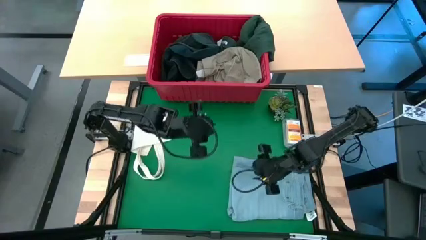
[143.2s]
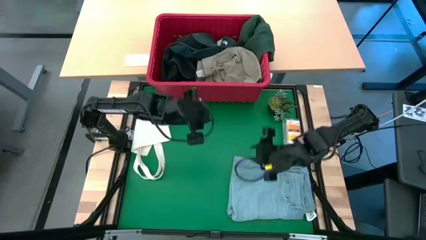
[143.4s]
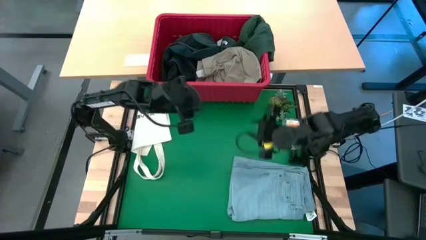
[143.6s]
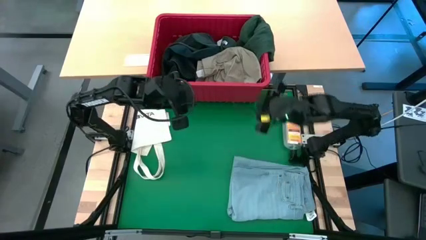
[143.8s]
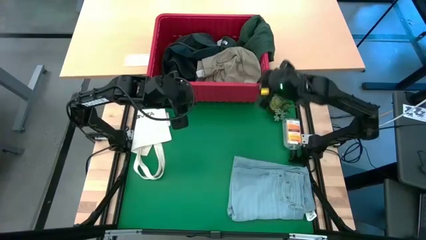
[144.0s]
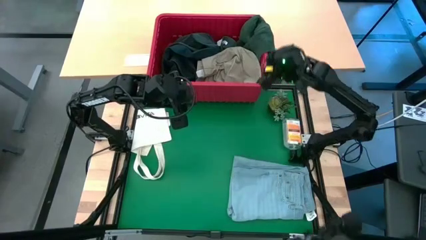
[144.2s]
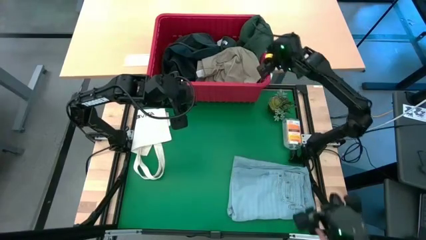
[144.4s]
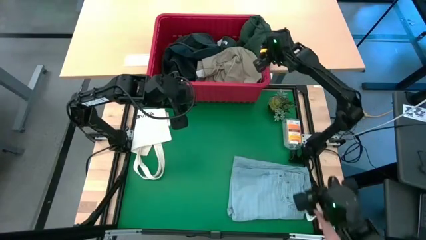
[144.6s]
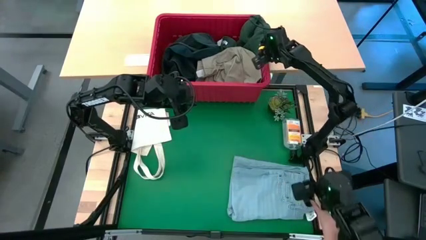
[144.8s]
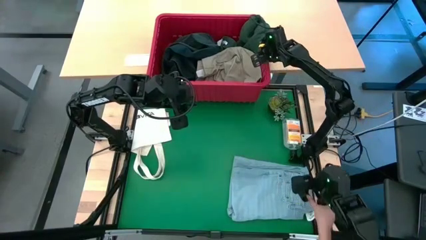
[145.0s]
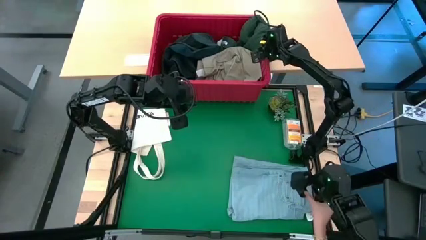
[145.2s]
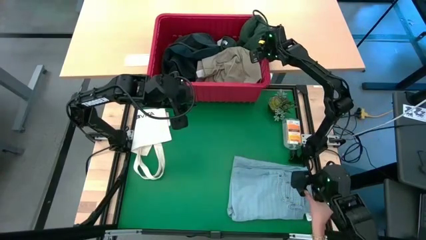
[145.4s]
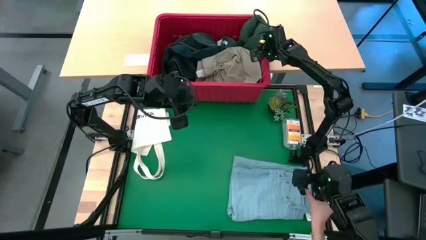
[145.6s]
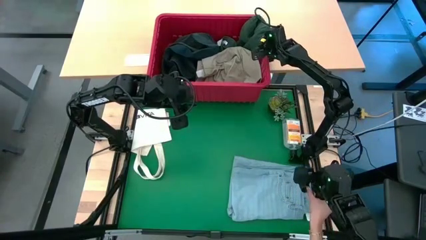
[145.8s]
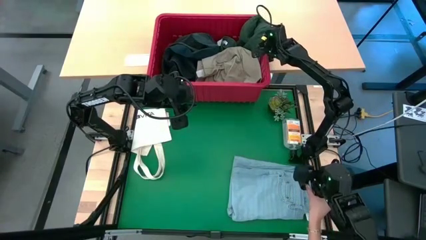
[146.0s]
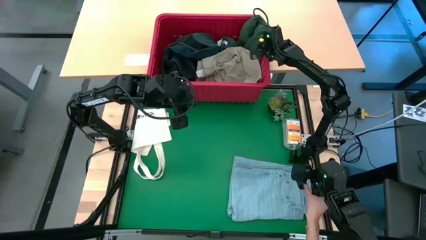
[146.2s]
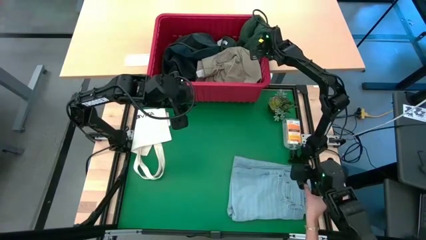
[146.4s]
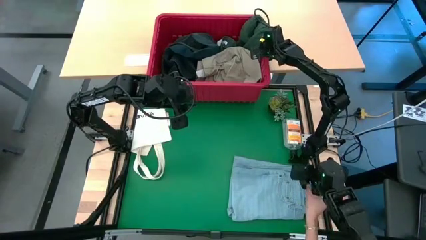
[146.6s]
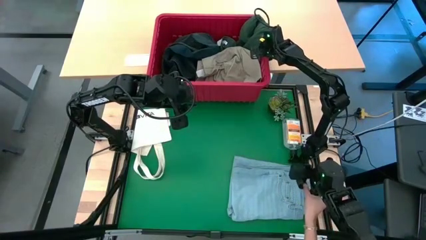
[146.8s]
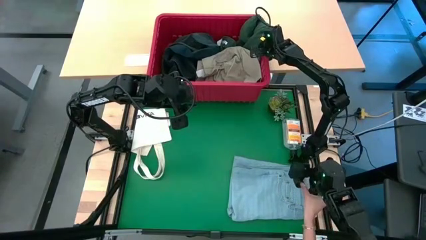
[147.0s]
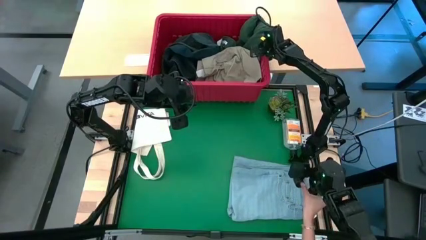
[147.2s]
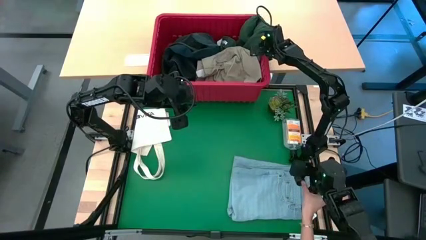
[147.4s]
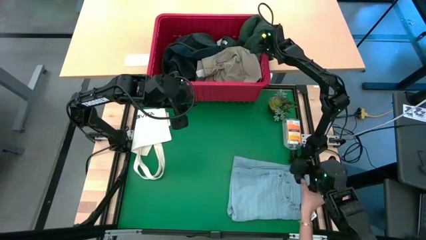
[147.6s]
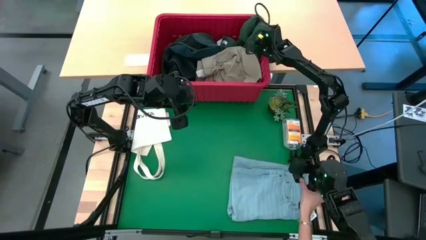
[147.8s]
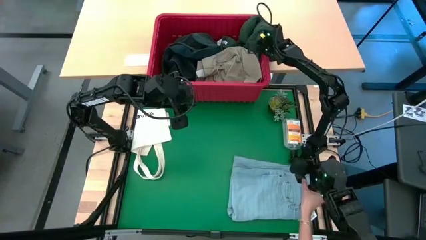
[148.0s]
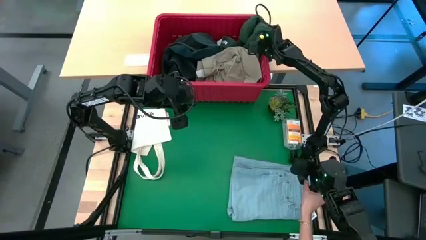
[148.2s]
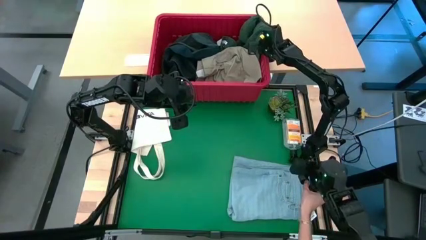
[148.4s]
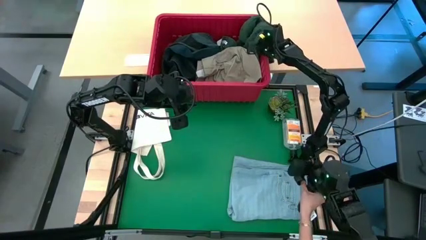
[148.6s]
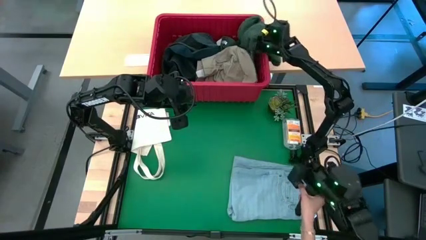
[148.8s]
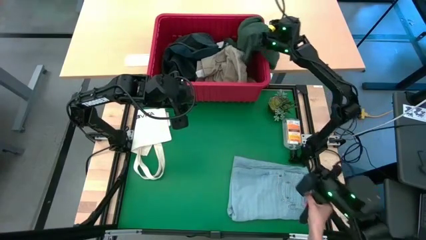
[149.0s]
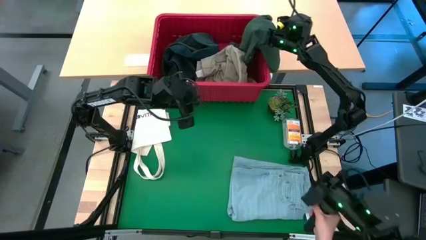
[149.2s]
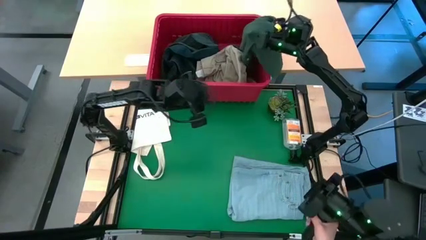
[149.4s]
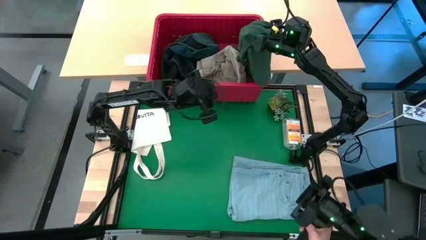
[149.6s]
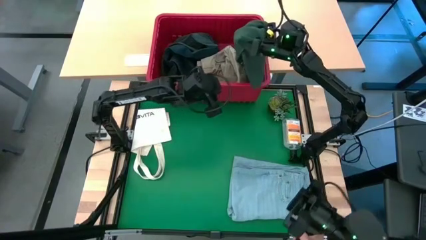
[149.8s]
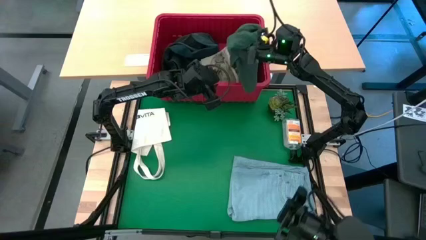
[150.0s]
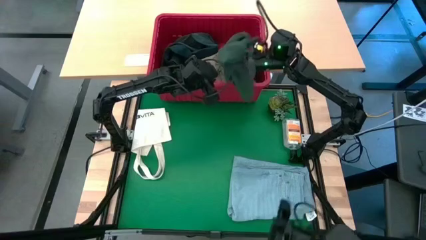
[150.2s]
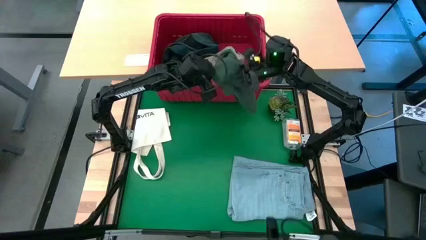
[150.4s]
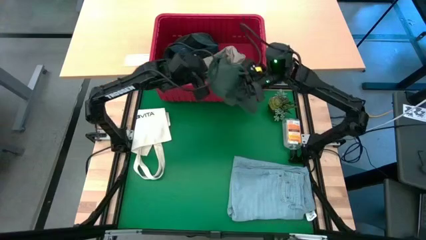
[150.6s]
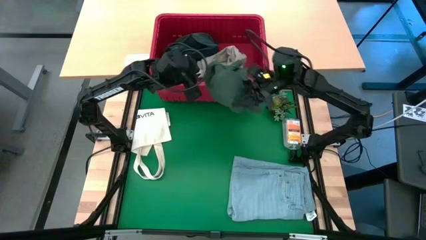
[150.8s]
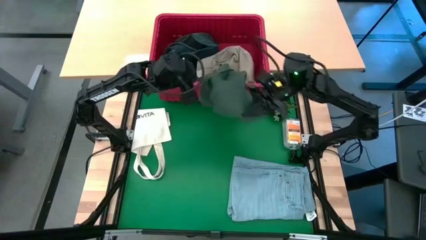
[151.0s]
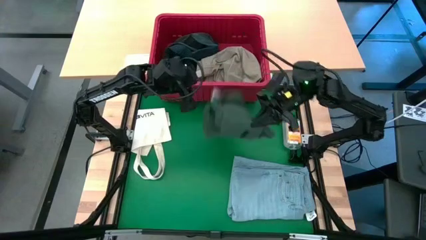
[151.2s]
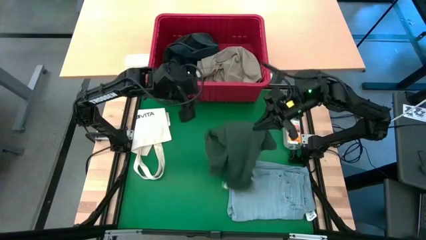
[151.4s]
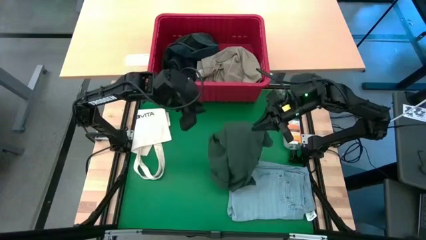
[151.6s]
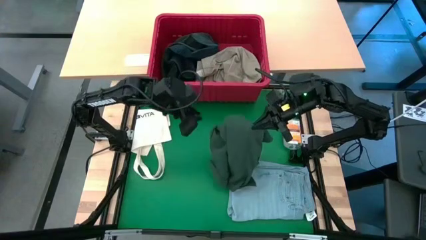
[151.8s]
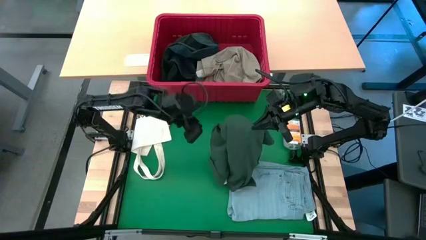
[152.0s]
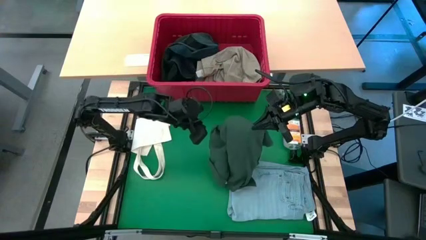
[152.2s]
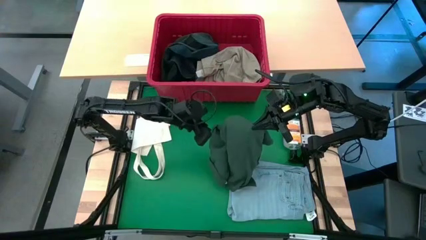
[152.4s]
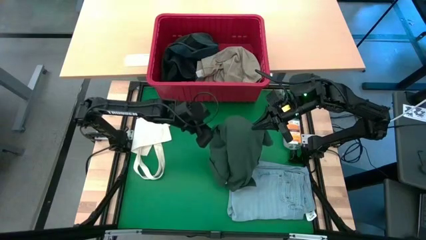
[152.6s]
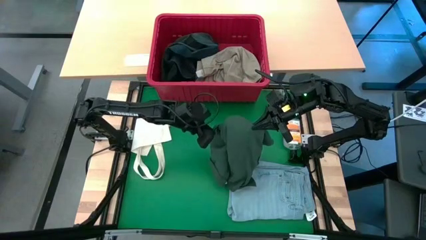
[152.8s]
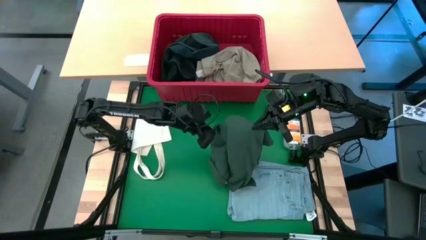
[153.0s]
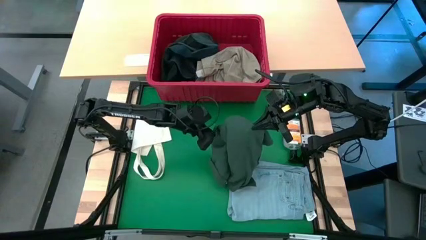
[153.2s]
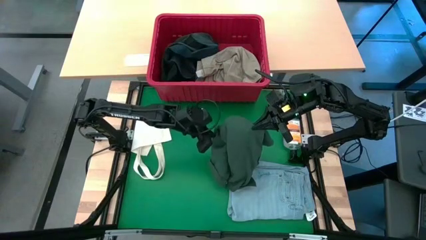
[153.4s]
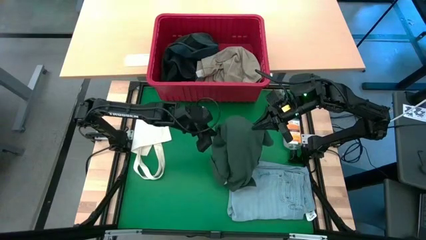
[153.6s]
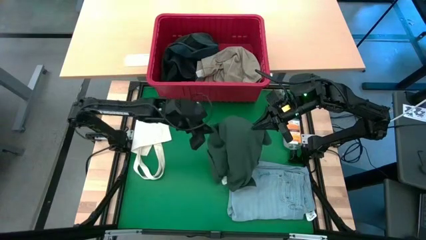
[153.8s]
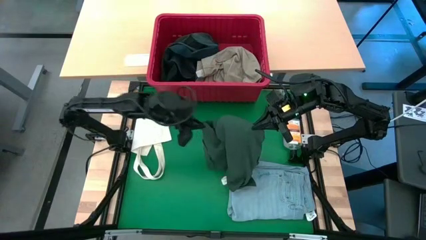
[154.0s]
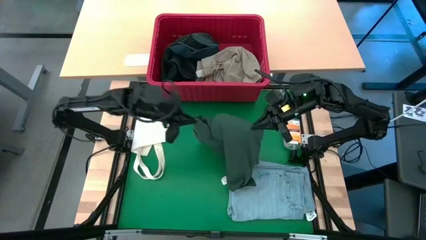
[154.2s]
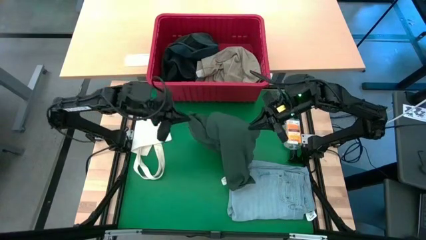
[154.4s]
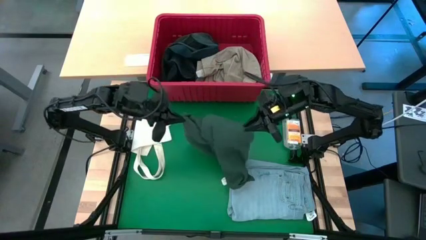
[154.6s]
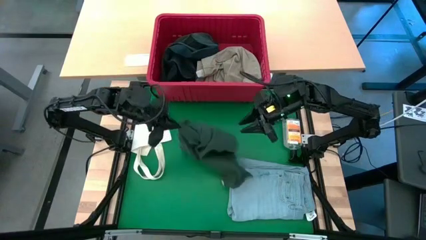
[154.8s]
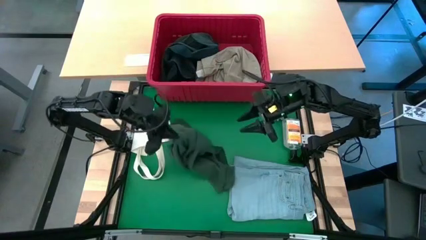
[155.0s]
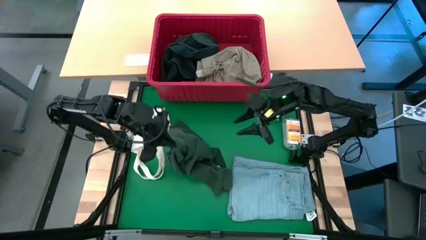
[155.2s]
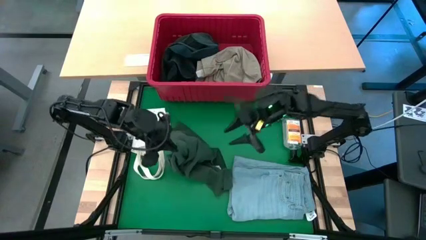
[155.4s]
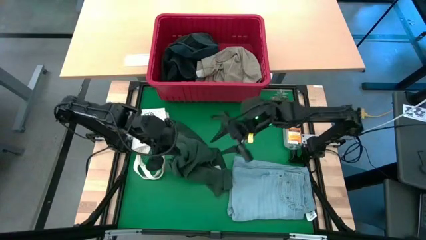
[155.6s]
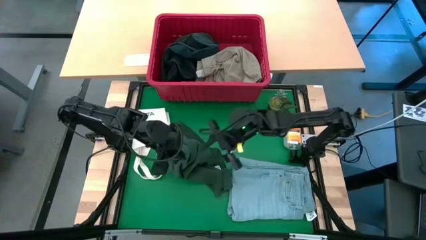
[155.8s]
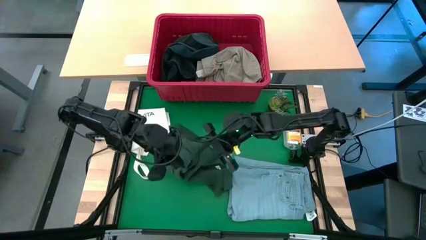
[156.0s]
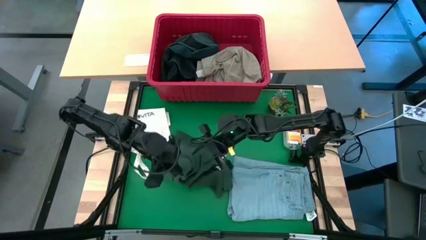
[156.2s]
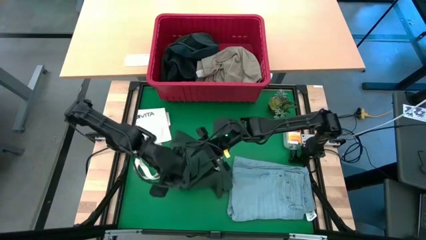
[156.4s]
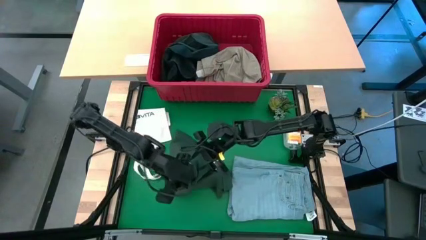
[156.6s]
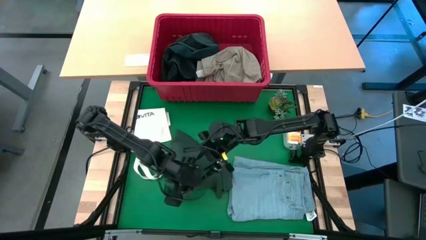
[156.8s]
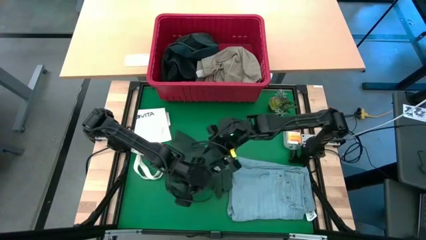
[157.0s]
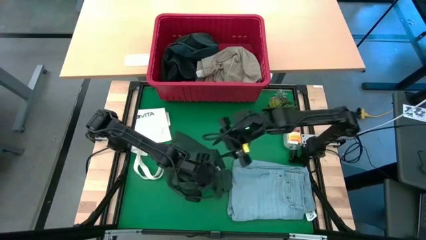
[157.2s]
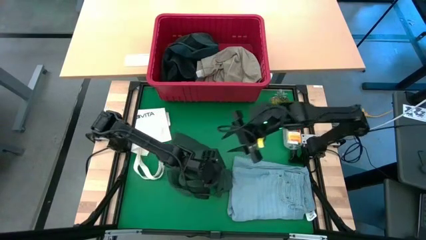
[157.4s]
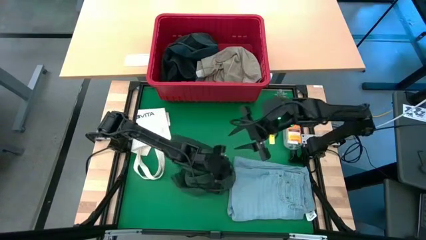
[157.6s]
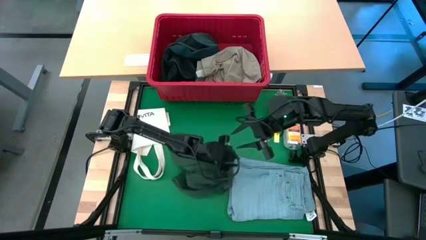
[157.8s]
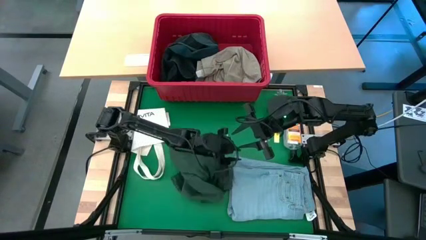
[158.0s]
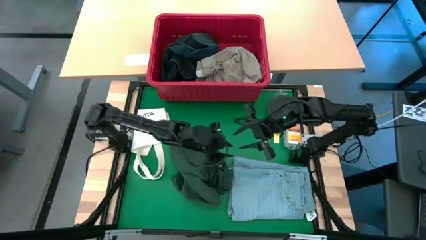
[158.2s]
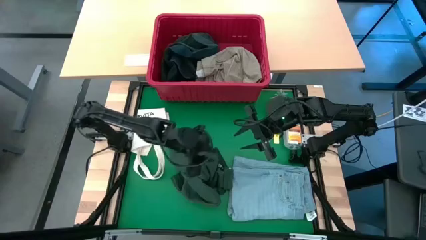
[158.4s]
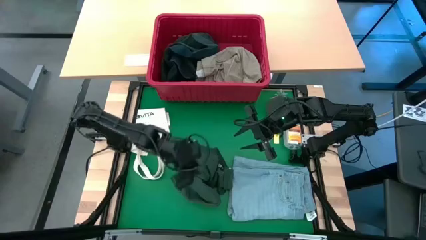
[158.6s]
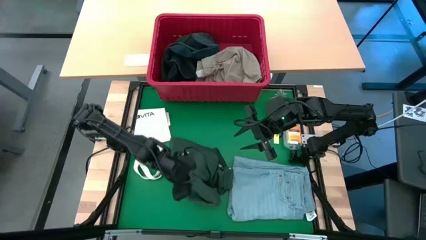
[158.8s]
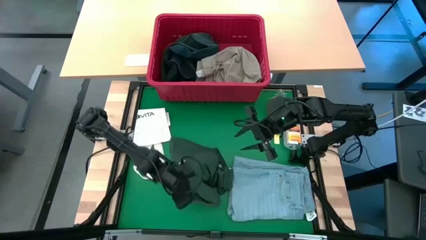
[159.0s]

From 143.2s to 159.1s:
Task: Fold Laundry from Bin
Remove the green shirt from the red bin

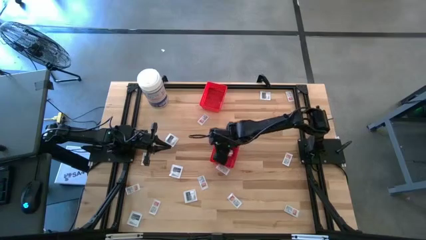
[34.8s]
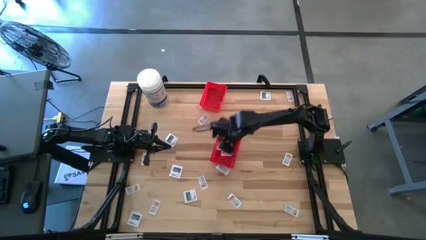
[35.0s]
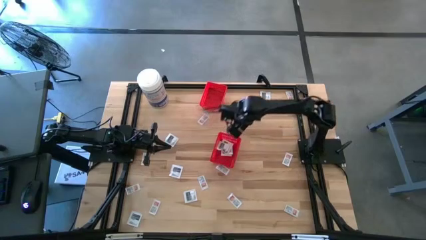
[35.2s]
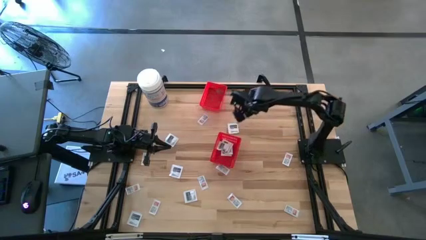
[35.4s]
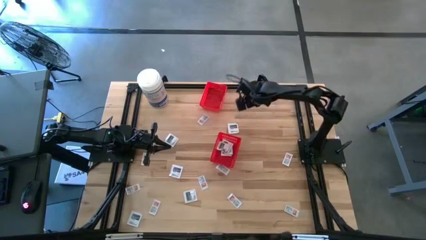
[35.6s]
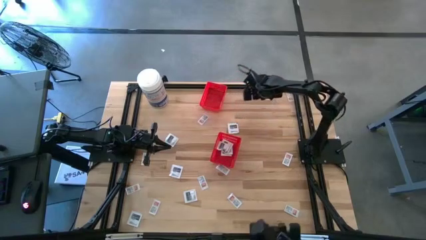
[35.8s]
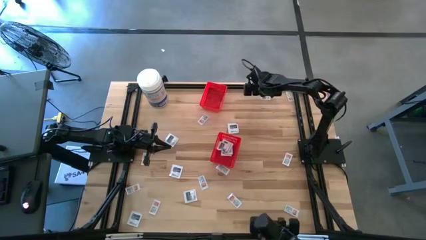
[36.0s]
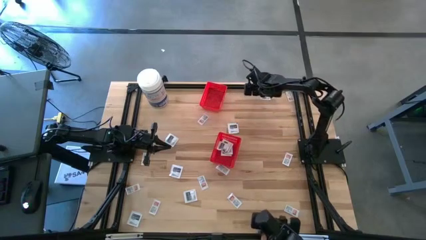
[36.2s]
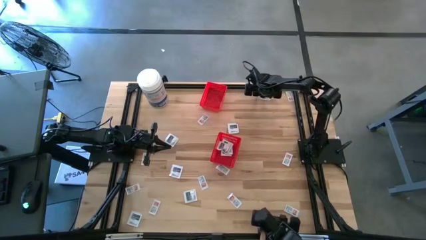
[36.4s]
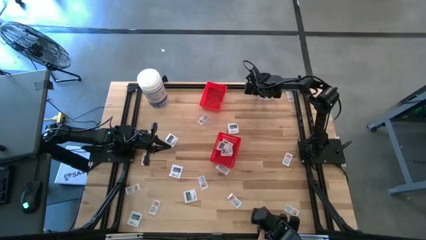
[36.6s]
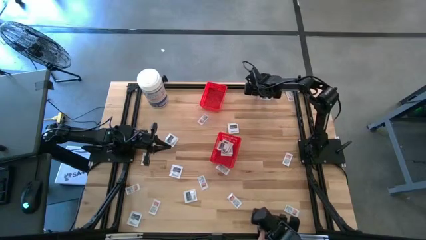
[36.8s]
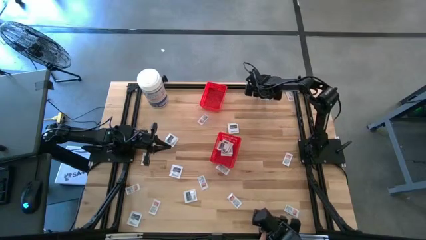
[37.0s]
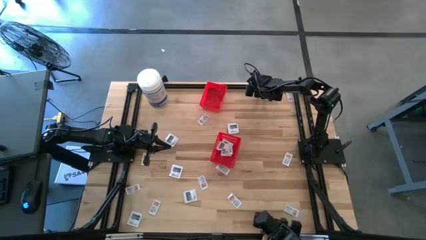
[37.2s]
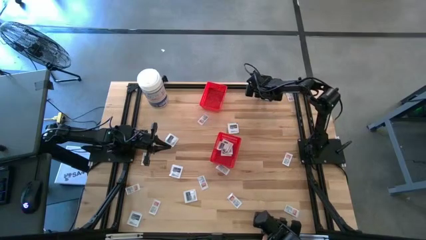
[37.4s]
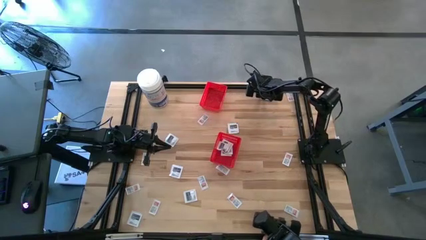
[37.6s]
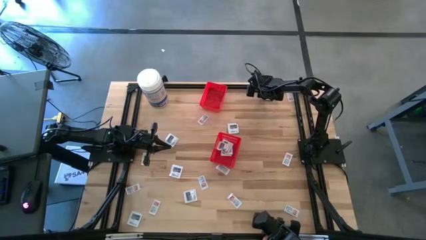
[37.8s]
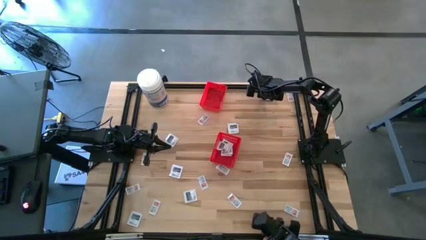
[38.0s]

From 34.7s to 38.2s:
Task: Pick & Place First Aid Supplies
Put the white towelette pack into the bottom red bin
